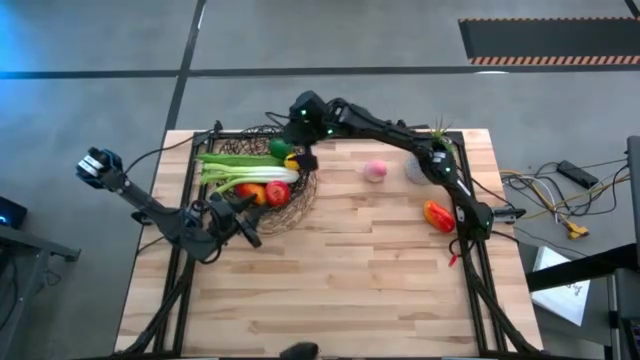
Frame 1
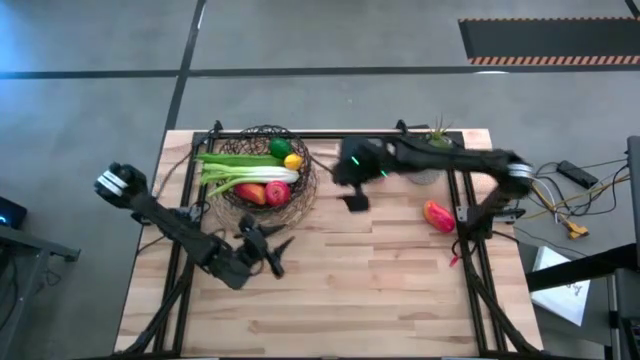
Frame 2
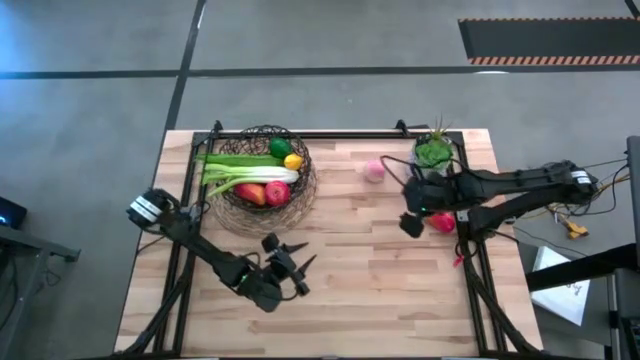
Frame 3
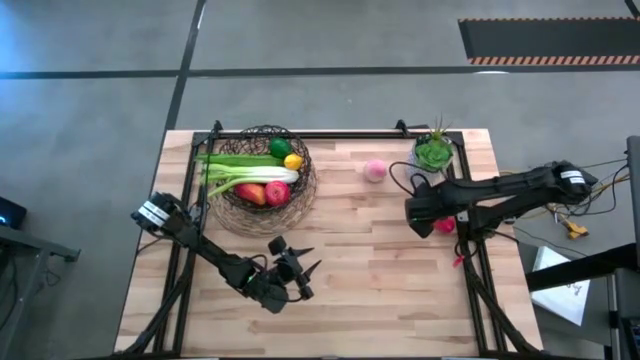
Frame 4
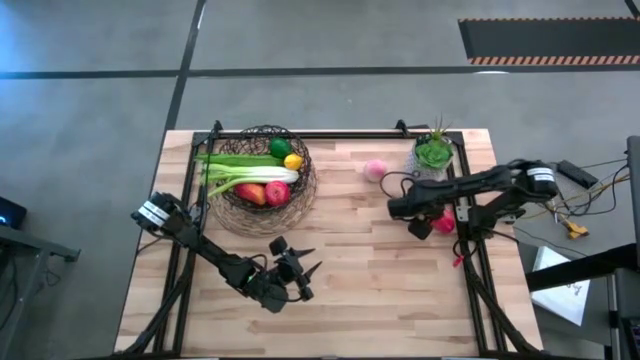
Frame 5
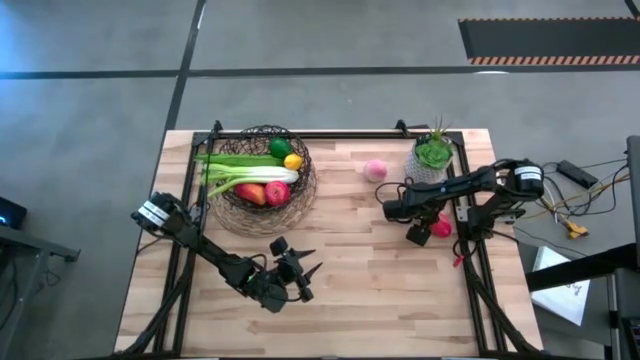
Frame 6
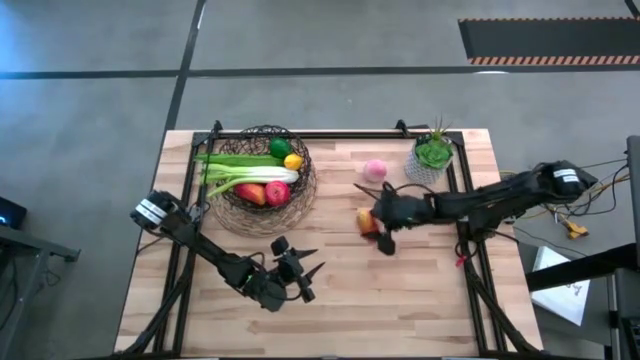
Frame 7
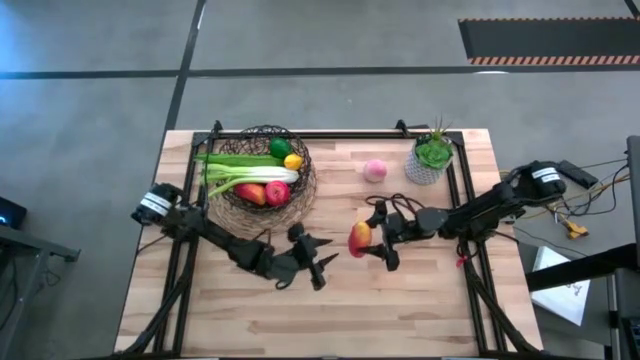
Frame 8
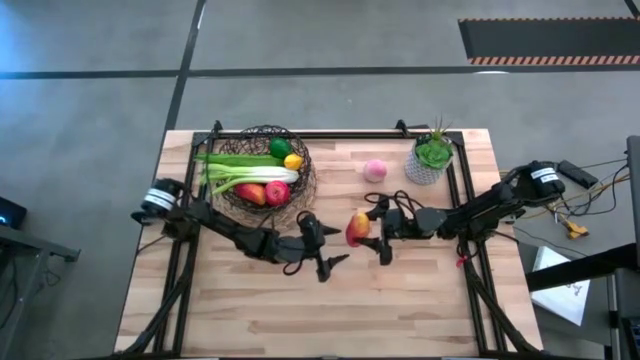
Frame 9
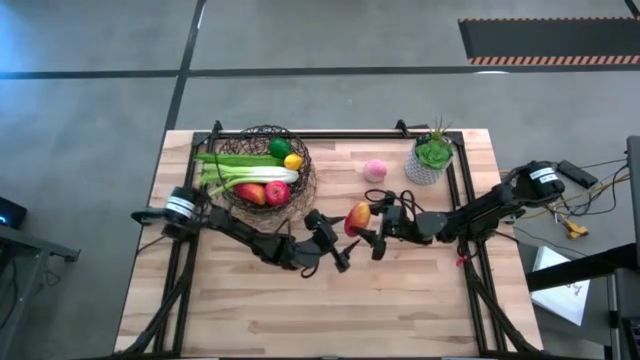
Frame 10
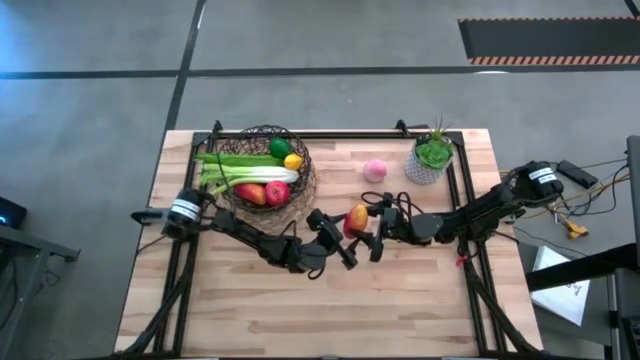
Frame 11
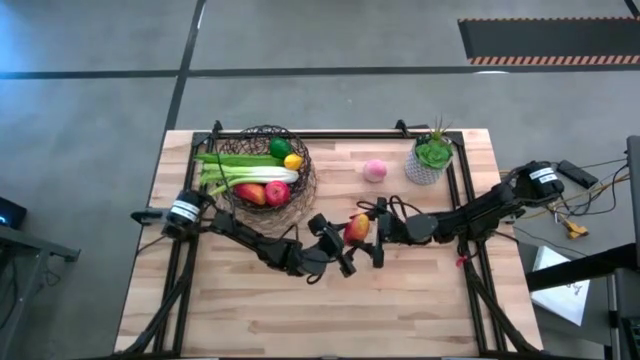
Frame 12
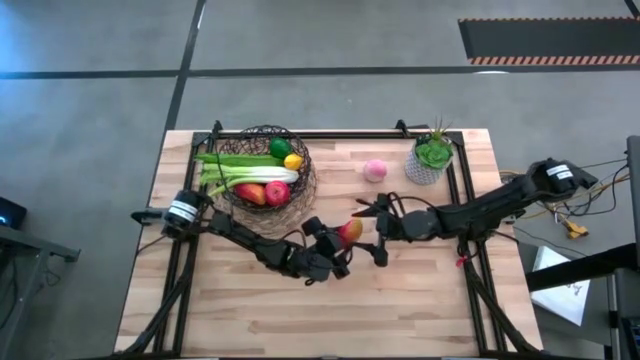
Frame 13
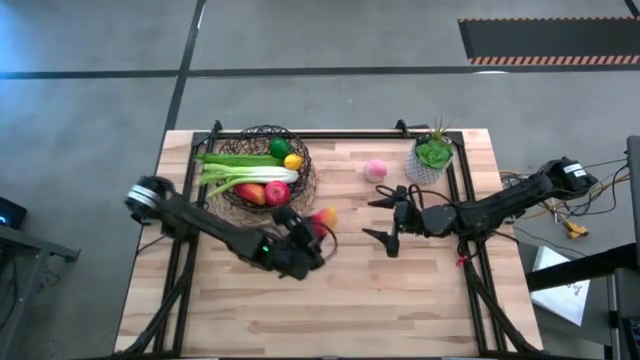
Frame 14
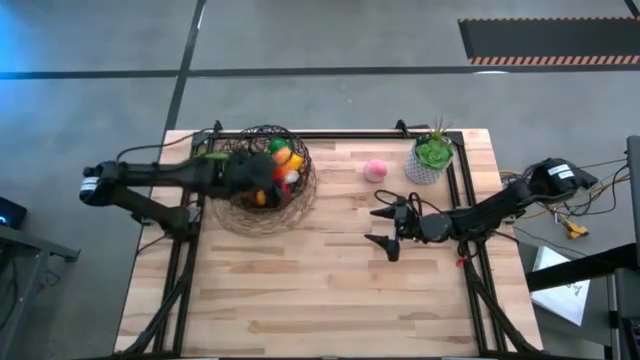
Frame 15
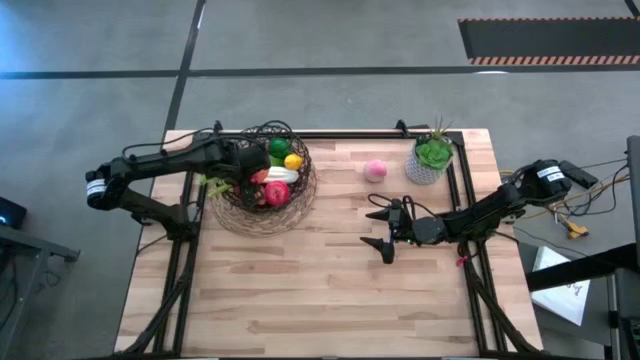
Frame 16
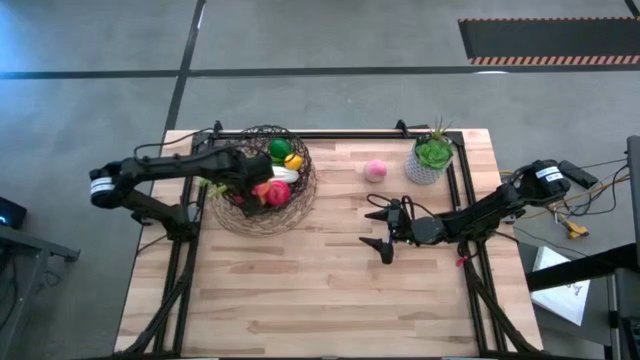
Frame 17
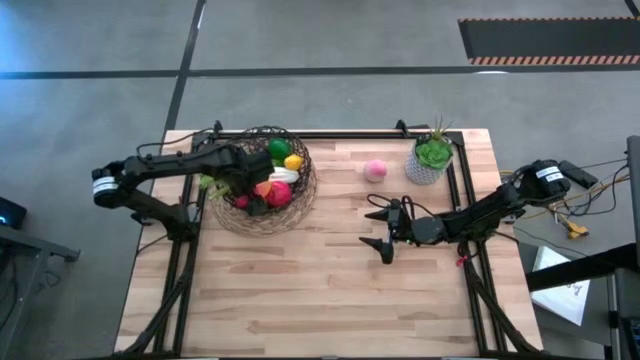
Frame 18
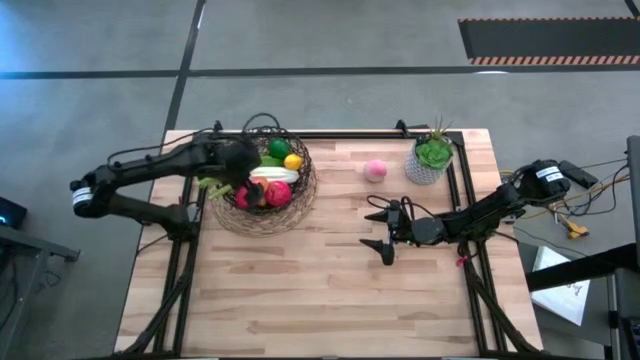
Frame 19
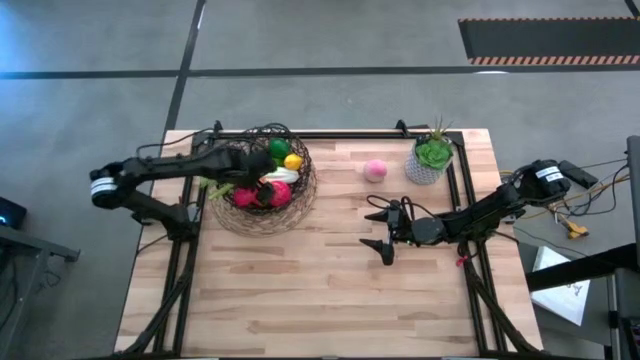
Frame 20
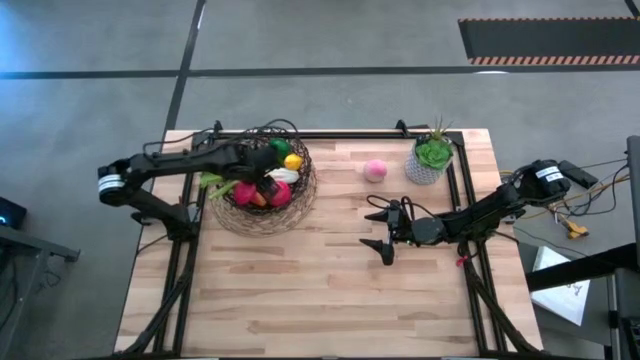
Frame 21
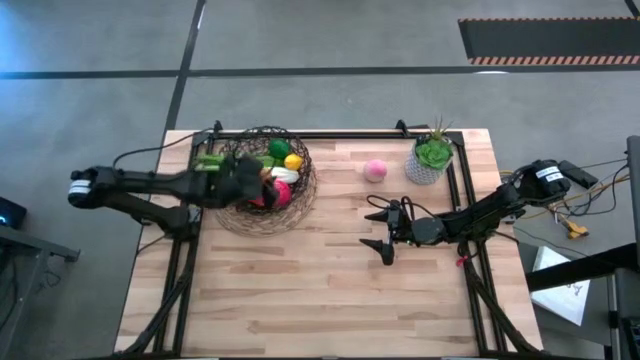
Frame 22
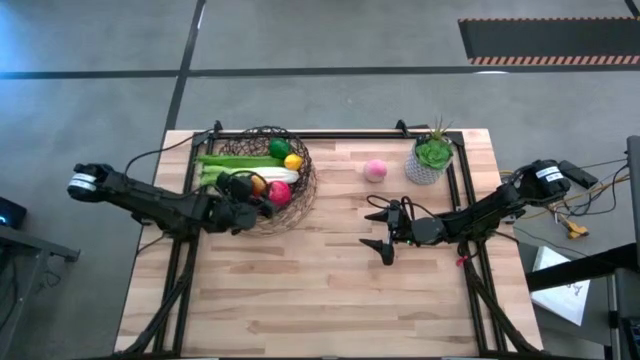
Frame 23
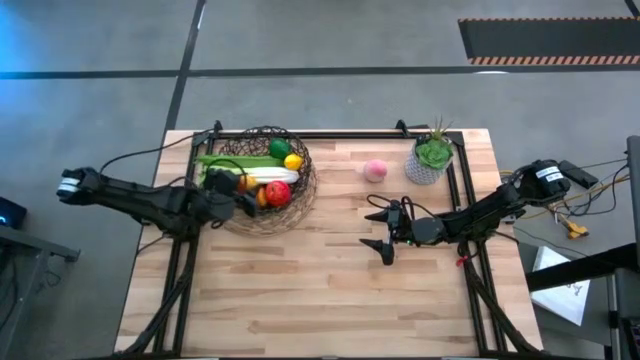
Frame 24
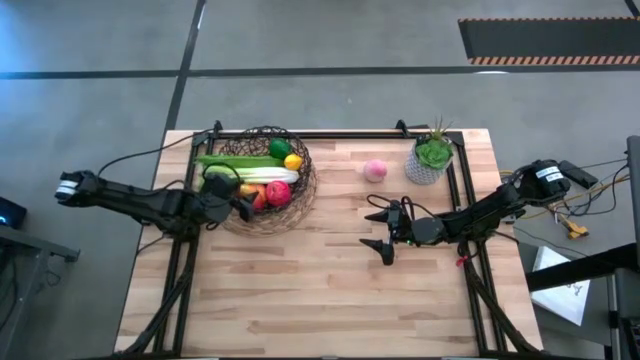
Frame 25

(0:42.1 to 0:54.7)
Task: Build produce basket
Put the orange mango into the black mesh basket

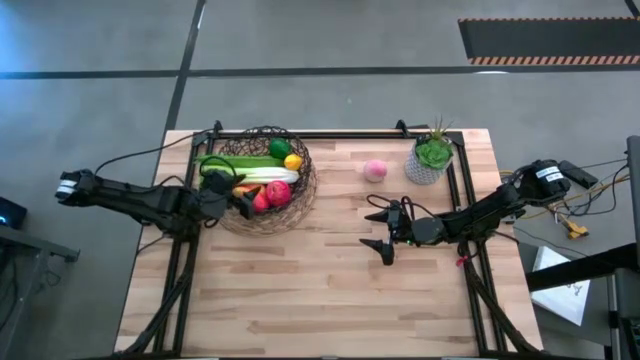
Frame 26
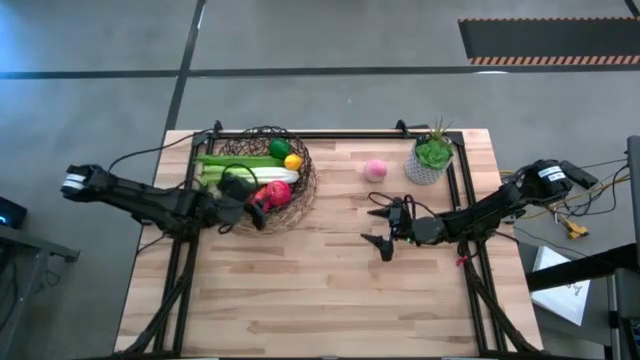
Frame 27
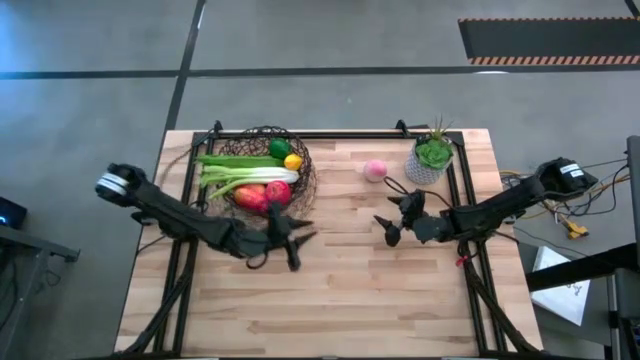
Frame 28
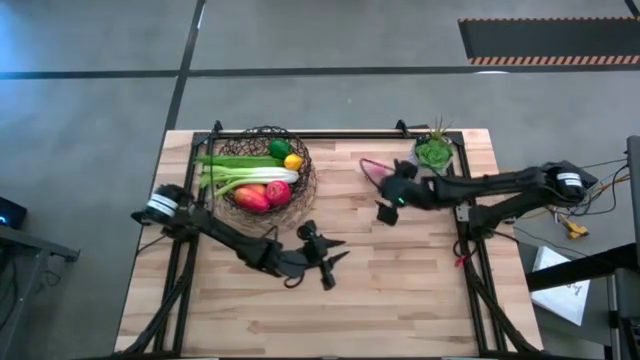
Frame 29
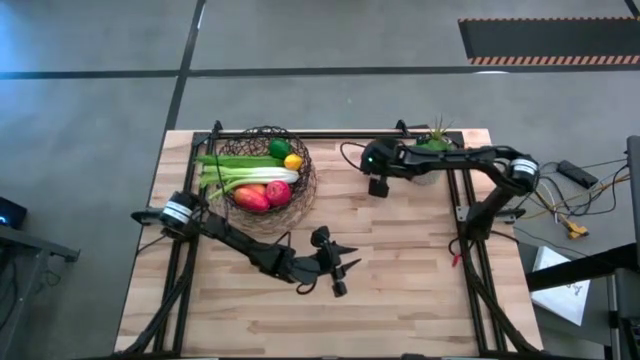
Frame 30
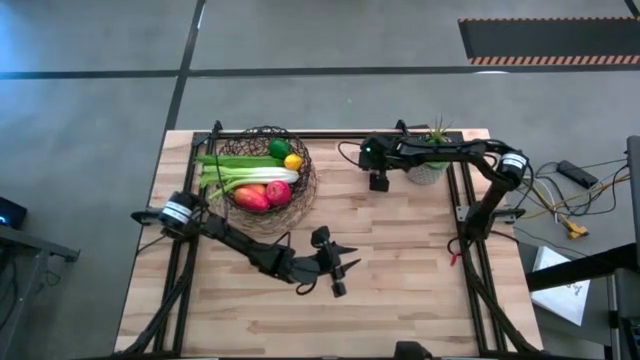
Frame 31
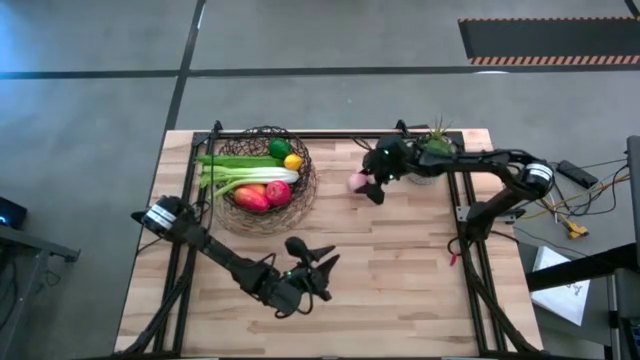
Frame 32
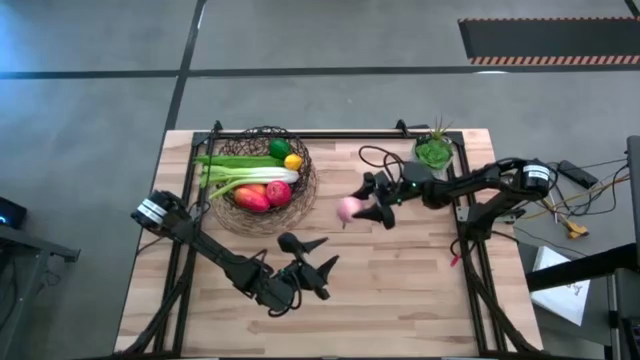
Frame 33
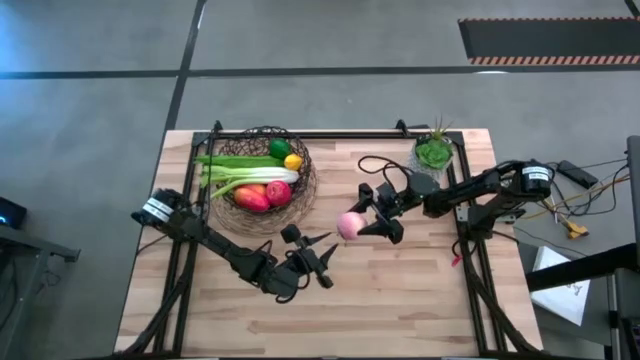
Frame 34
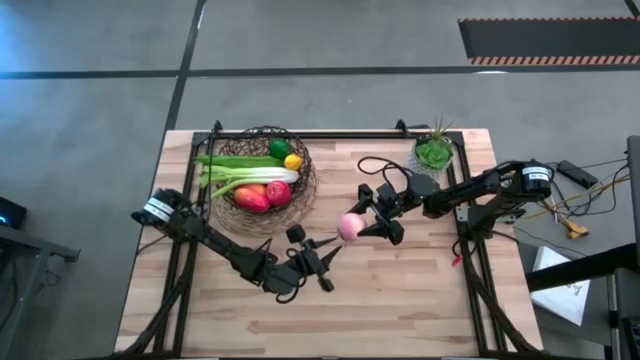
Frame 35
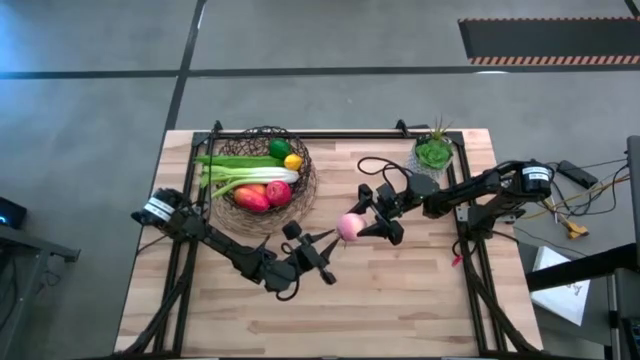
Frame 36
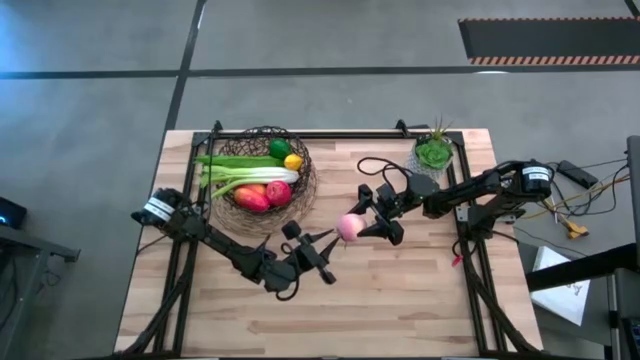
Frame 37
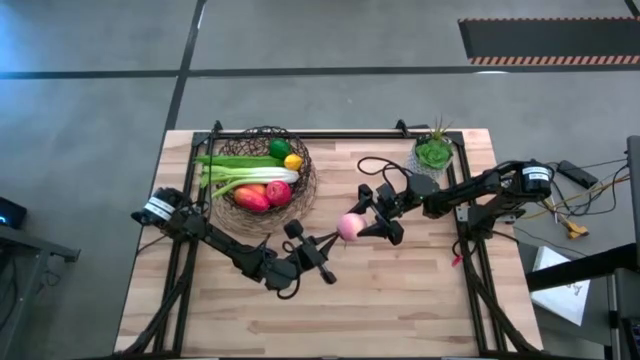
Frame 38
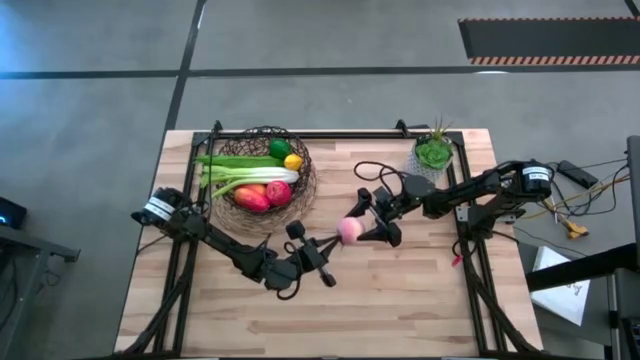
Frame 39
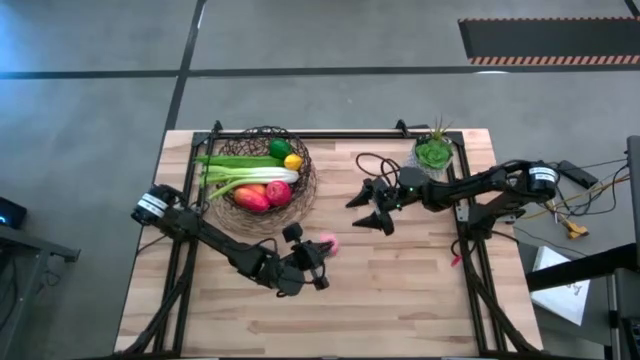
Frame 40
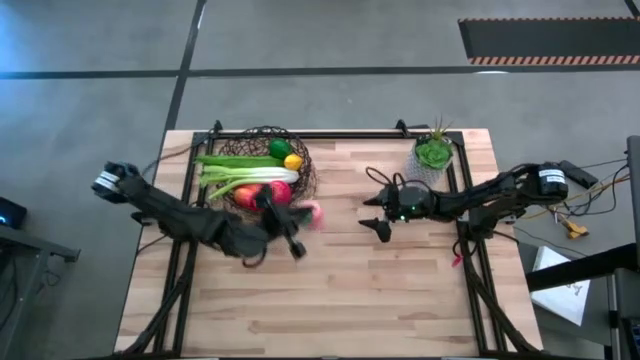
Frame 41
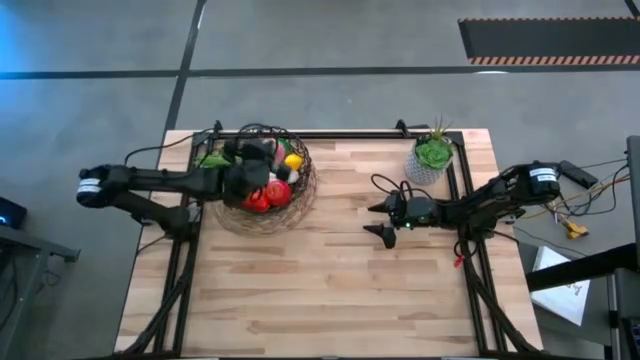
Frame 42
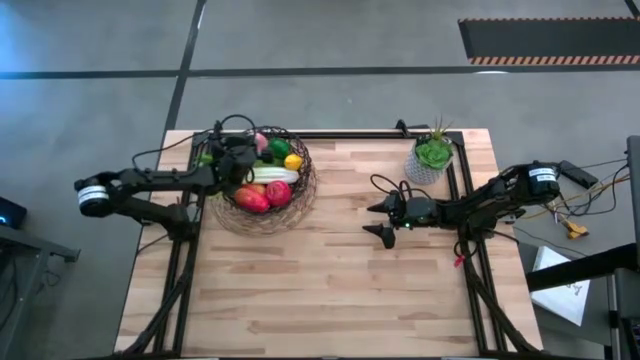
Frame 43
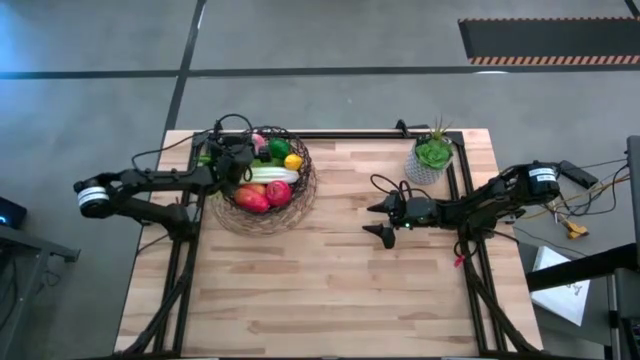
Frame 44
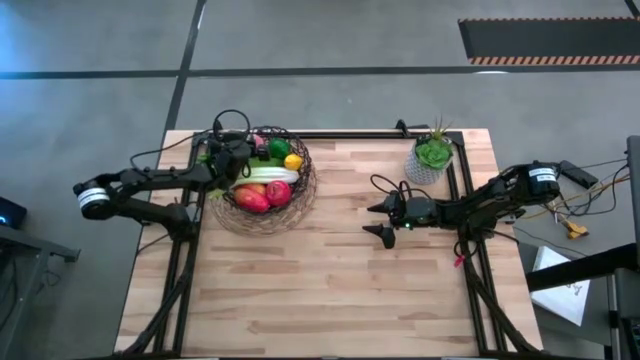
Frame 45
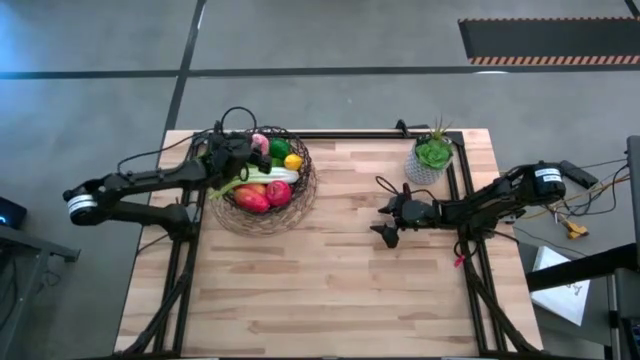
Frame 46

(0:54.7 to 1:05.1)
Put the pink peach into the black mesh basket
